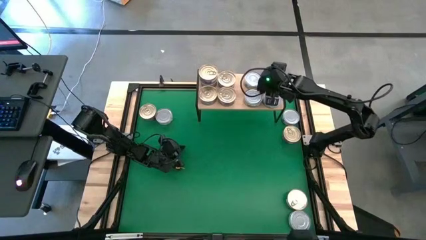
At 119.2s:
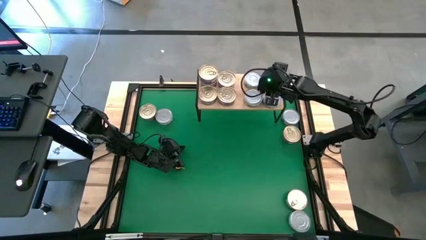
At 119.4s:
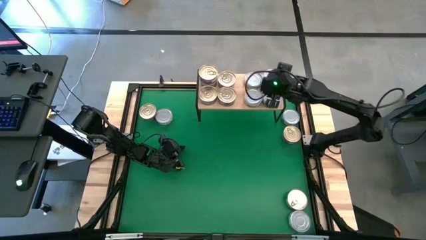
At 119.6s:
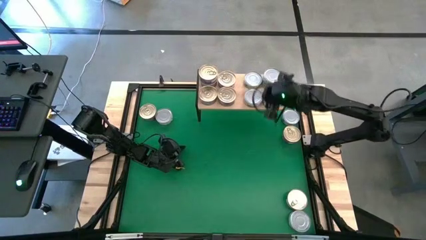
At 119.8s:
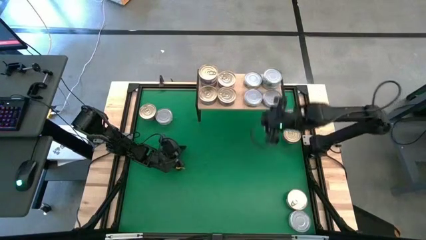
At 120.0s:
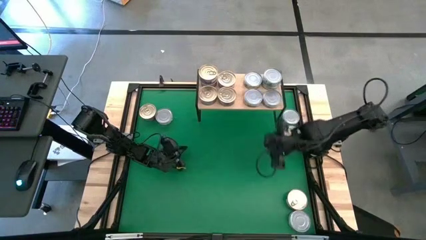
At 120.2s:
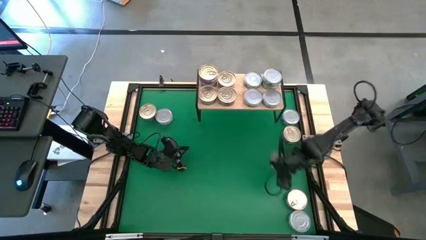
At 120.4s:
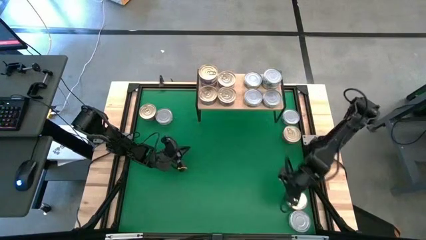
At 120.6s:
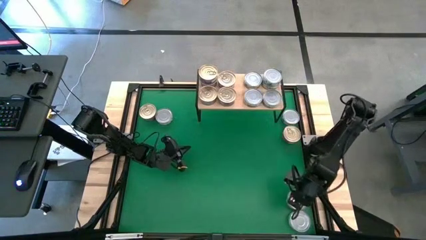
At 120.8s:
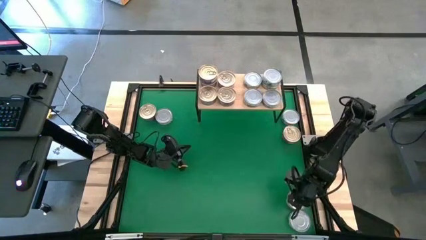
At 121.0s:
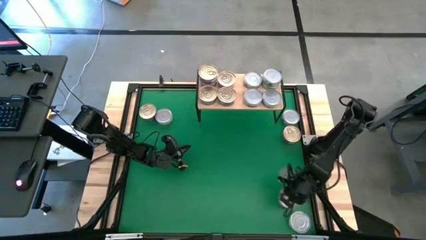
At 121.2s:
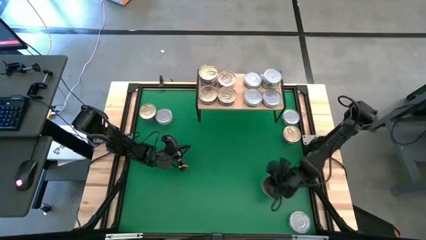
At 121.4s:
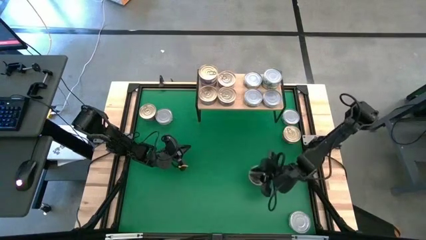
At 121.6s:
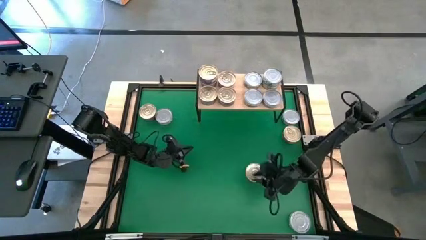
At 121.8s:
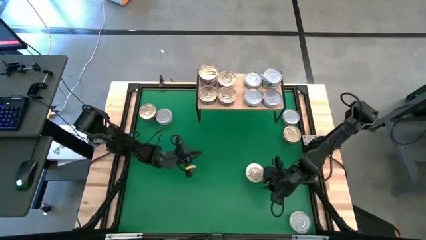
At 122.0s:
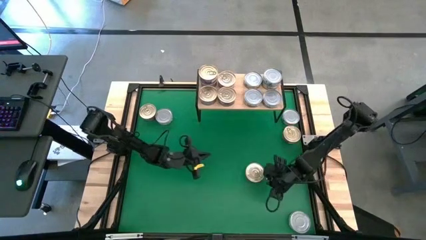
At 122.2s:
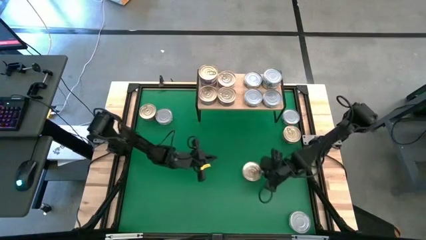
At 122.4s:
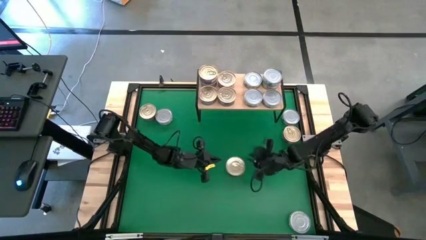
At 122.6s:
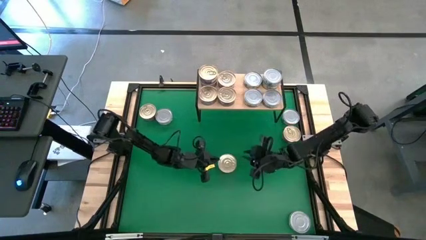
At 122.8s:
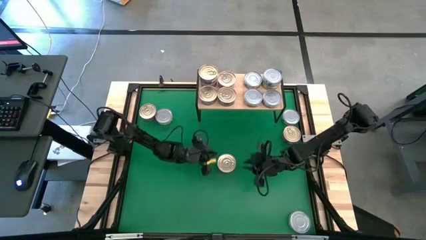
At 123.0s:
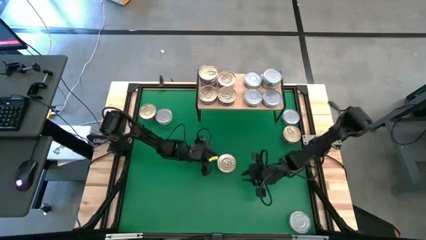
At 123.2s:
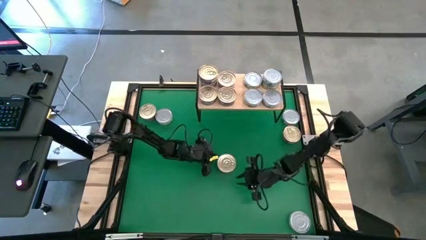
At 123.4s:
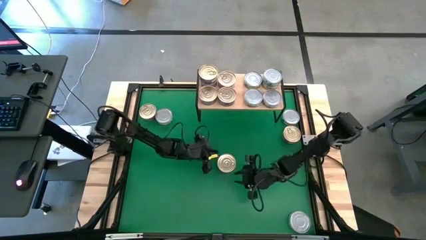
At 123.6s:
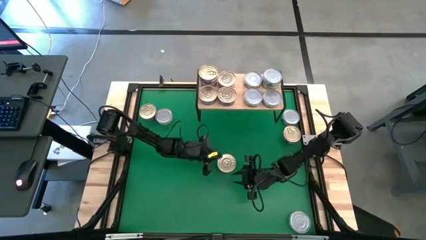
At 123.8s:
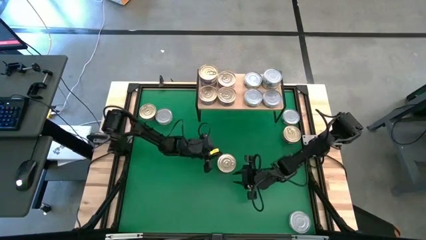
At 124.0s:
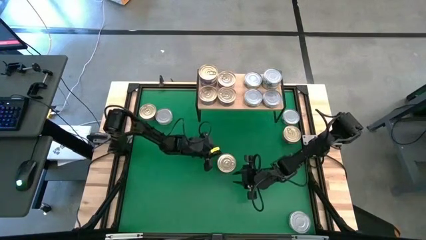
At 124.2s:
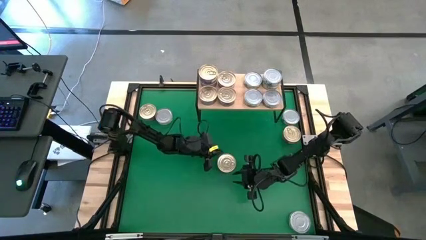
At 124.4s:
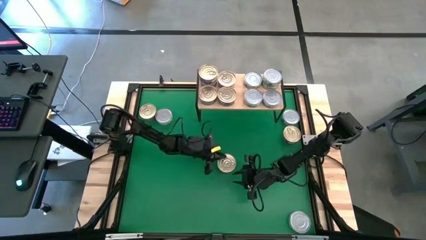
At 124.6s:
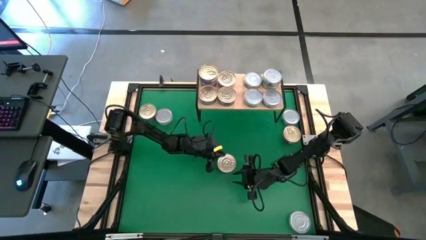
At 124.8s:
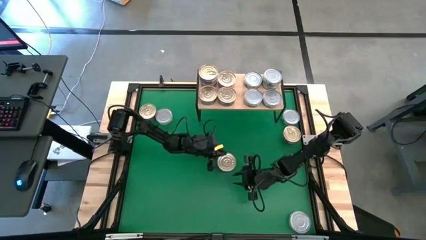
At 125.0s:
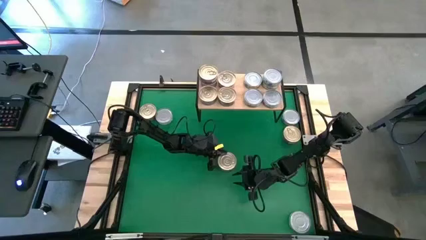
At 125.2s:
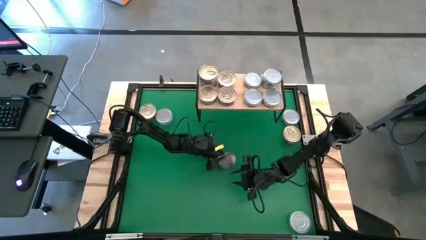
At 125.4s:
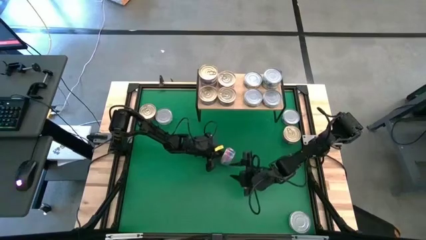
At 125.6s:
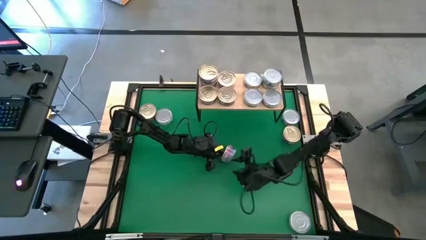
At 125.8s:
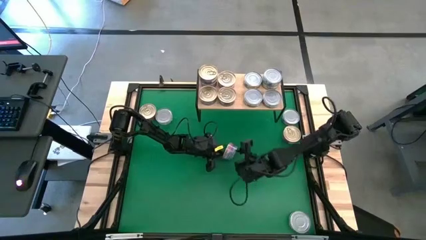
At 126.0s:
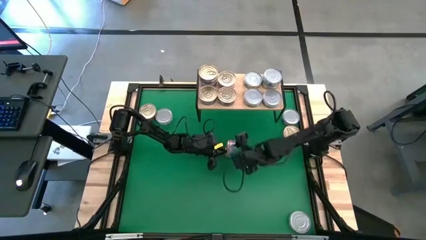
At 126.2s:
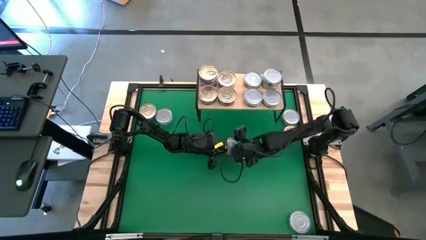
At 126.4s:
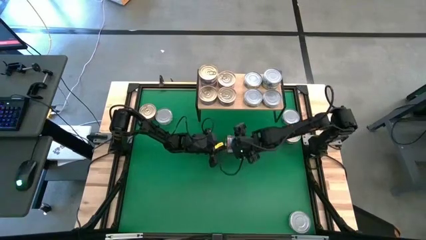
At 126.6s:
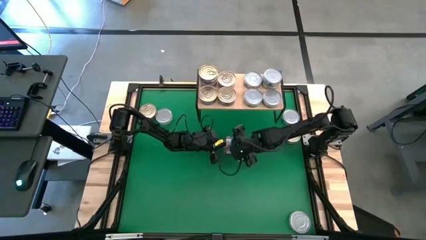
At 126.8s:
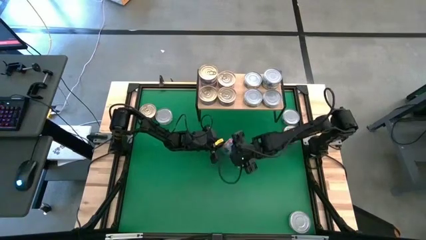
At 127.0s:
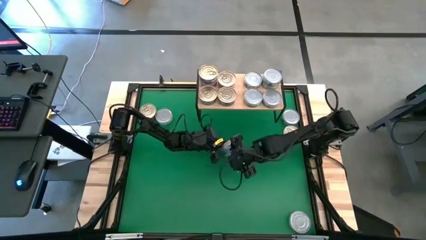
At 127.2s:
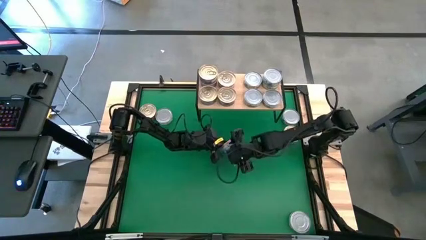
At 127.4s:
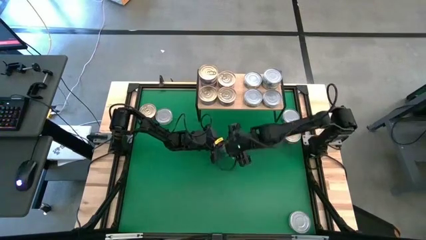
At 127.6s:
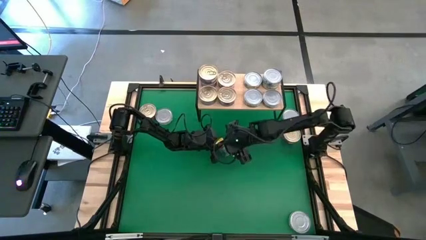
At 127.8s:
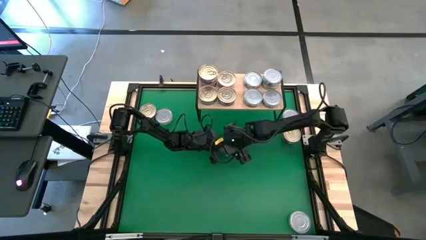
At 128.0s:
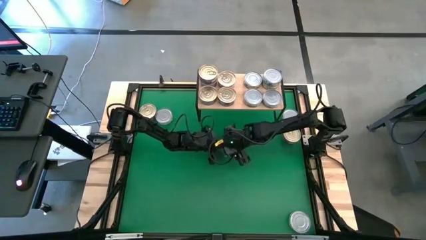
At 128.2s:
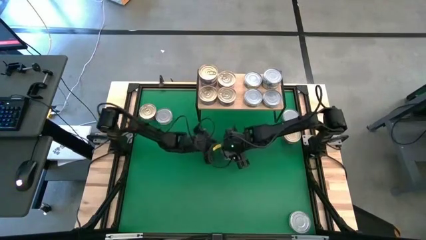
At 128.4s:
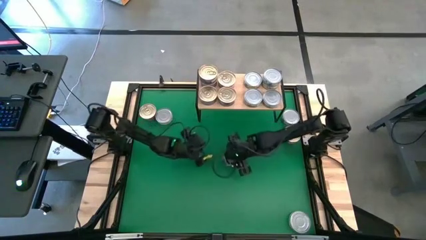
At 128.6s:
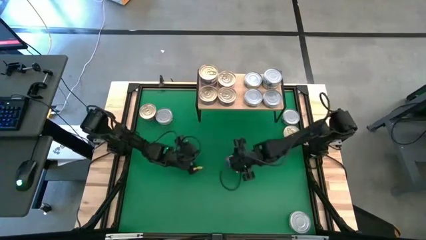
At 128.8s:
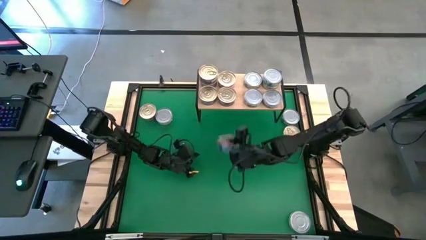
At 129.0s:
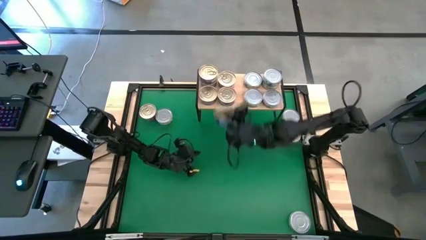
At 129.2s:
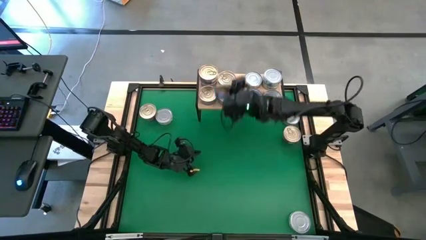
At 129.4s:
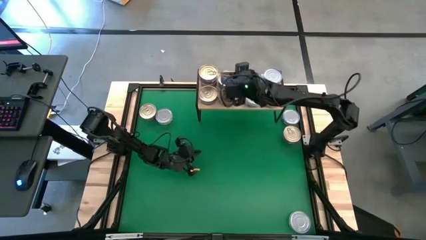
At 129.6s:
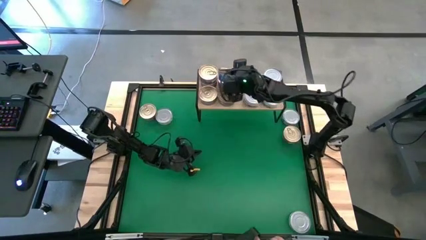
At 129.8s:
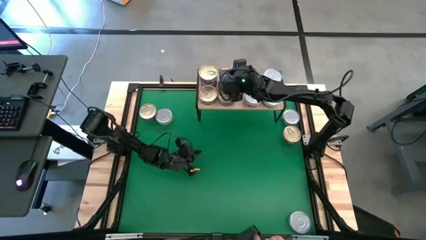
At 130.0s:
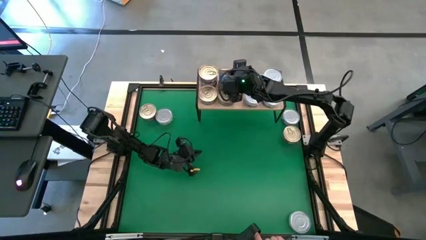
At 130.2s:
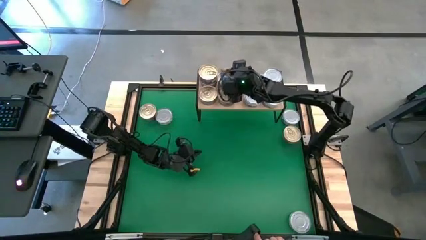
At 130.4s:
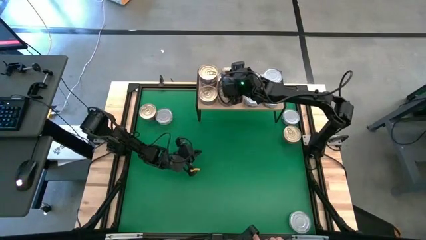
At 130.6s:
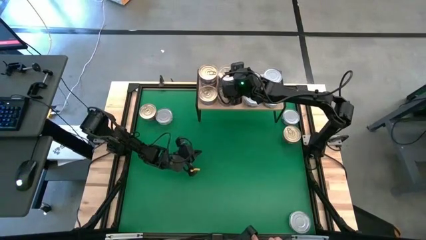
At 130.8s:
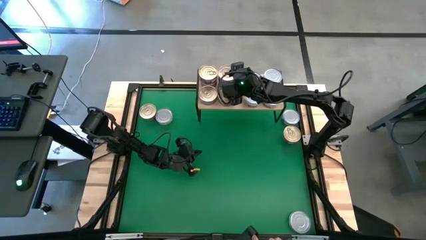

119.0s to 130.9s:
Task: Stack canned seafood by type on shelf
Stack the blue pink tuna can on top of the blue pink tuna can on the shelf

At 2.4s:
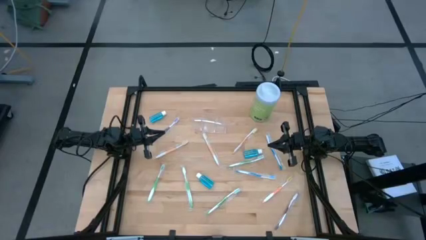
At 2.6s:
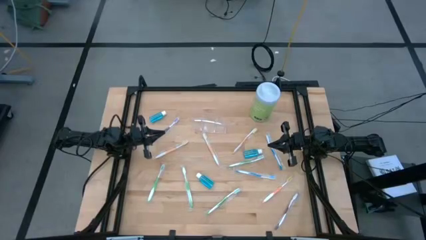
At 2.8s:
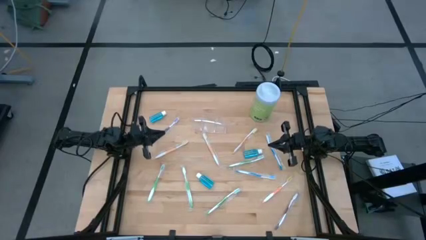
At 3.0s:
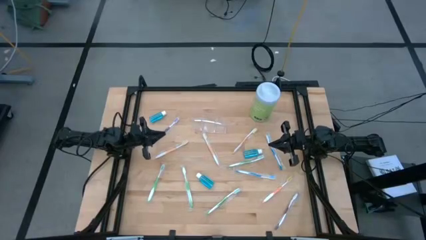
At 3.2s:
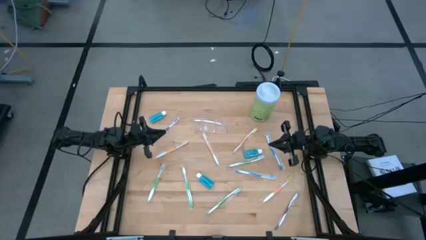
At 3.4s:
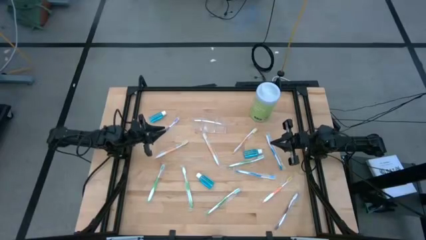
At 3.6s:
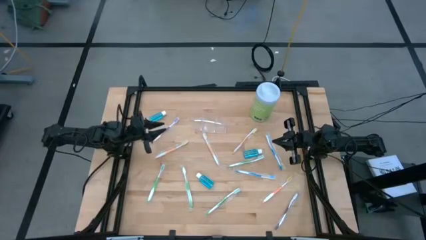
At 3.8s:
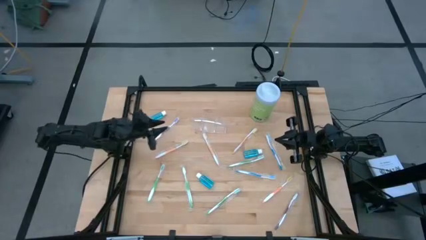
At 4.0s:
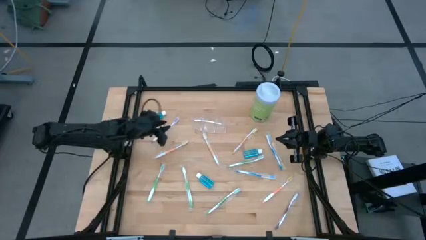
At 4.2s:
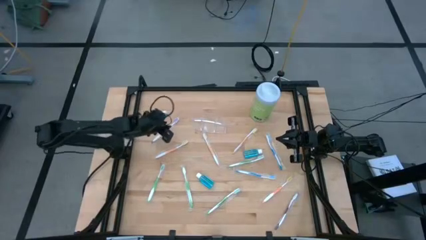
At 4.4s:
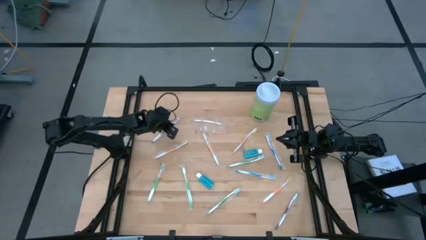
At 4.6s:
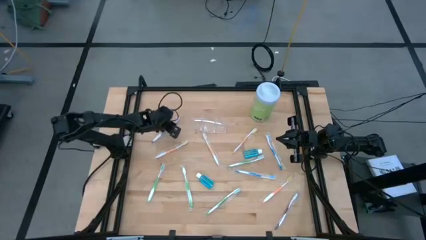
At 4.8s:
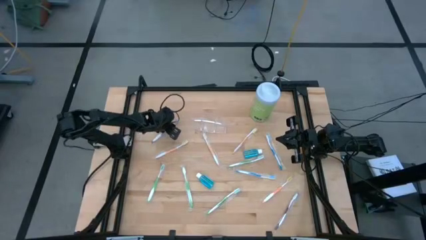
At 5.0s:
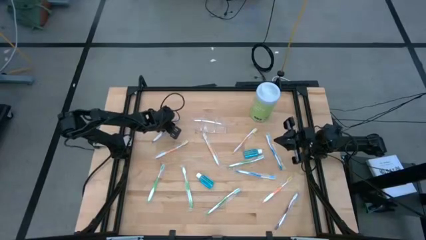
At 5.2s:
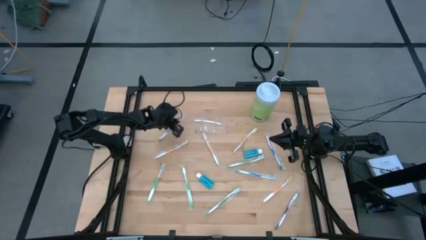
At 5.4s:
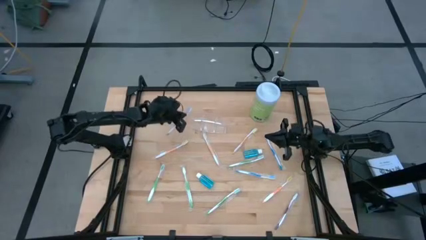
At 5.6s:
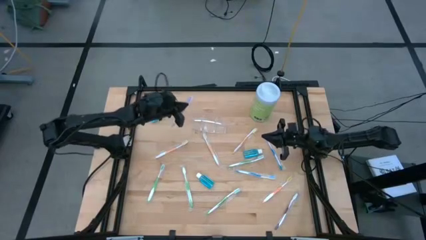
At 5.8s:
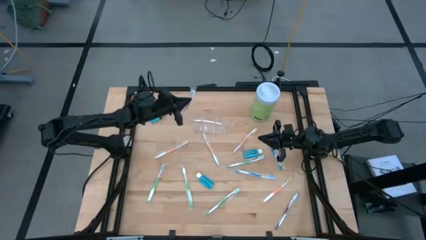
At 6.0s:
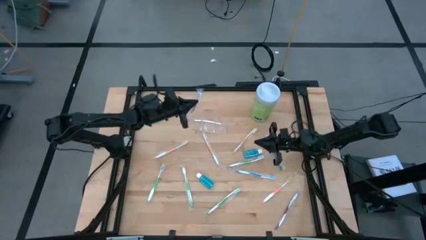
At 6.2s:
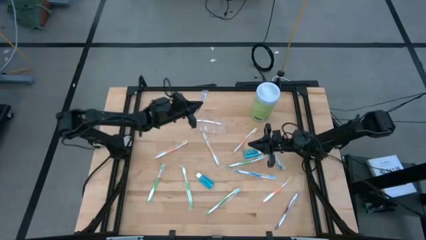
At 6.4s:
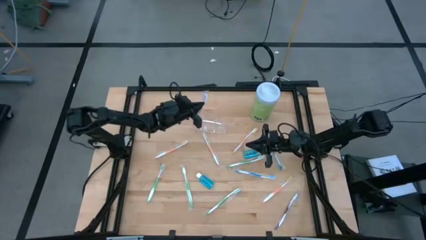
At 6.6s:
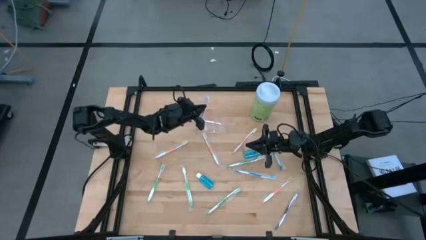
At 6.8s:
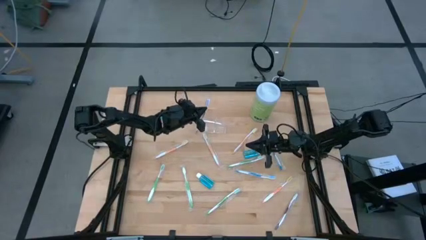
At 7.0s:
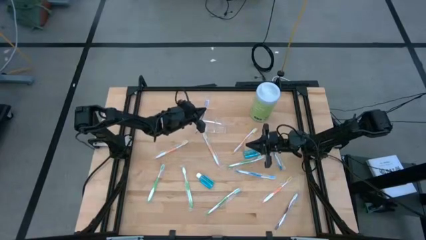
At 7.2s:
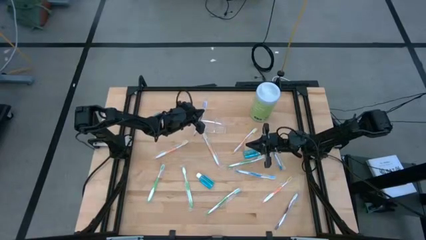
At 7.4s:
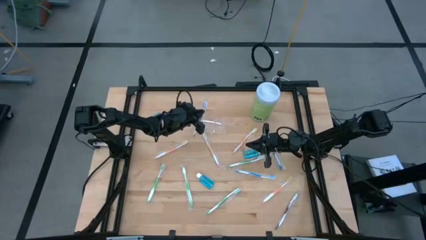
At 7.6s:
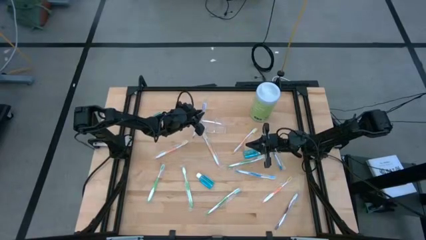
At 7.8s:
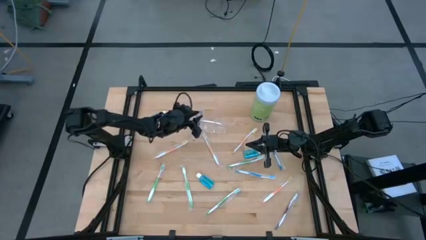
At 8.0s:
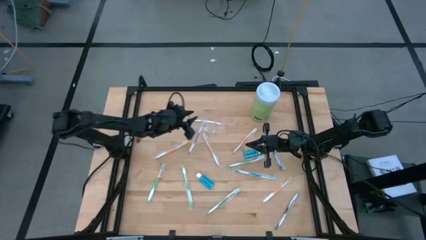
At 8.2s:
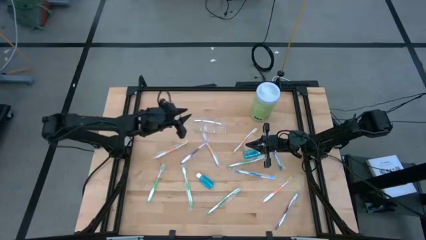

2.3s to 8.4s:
Task: Pick & Place toothbrushing station
Put the purple toothbrush into the transparent organizer
